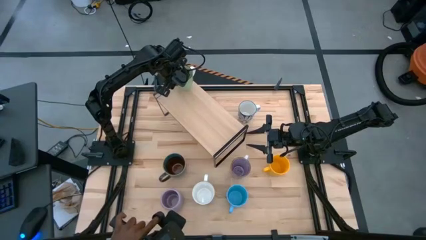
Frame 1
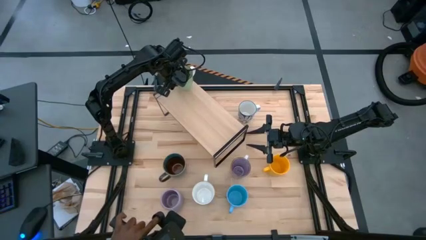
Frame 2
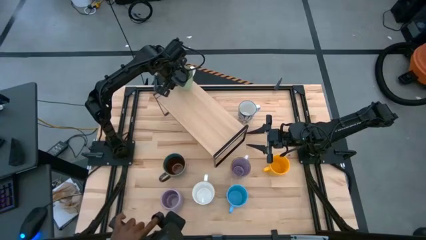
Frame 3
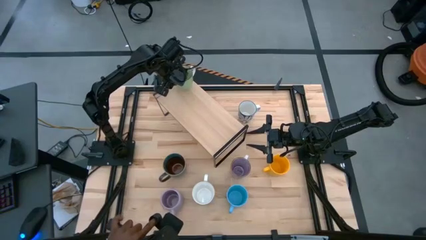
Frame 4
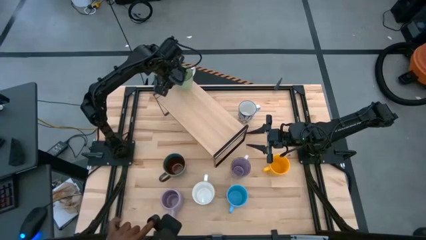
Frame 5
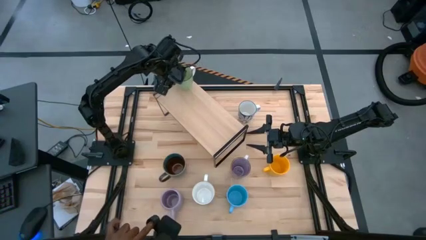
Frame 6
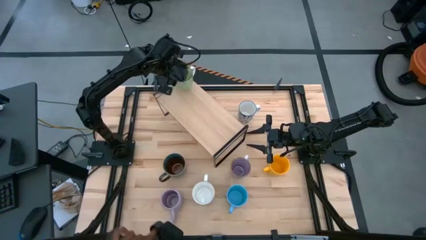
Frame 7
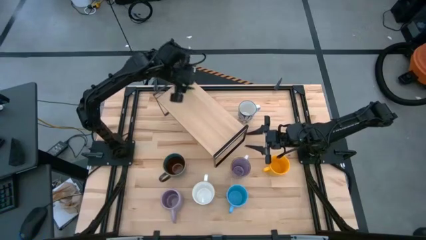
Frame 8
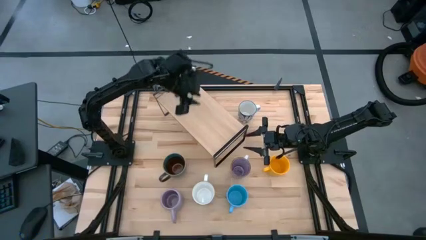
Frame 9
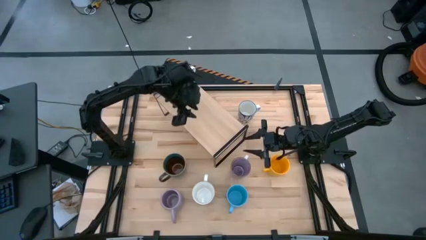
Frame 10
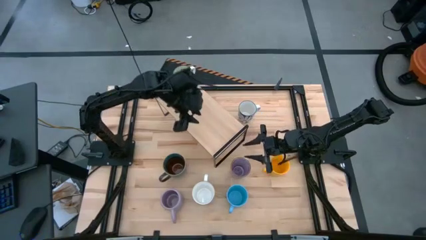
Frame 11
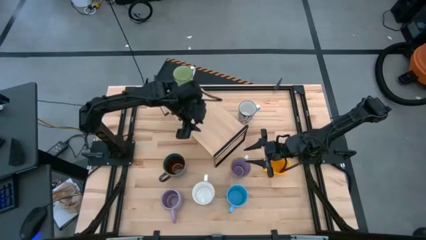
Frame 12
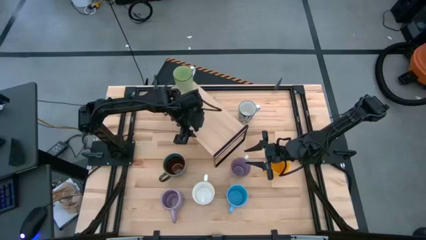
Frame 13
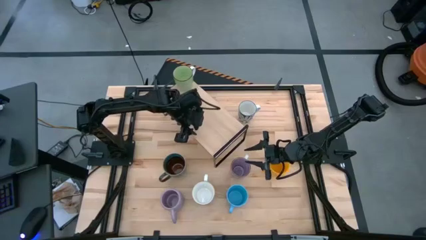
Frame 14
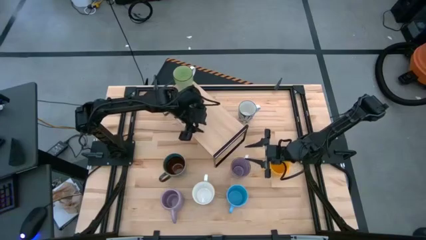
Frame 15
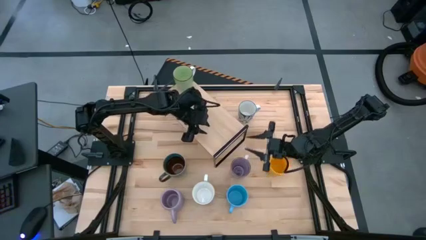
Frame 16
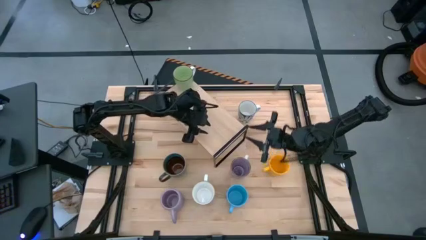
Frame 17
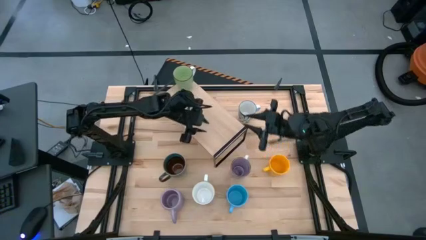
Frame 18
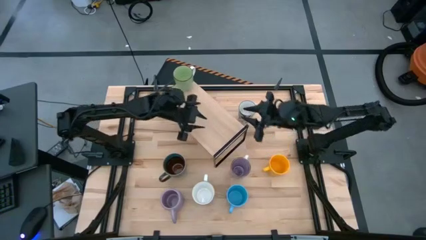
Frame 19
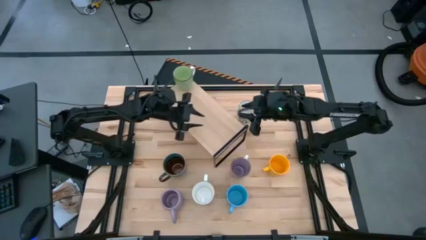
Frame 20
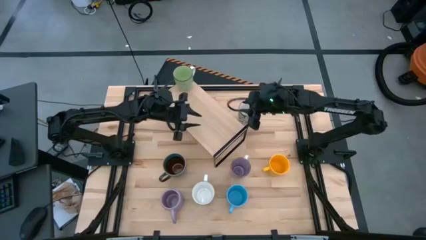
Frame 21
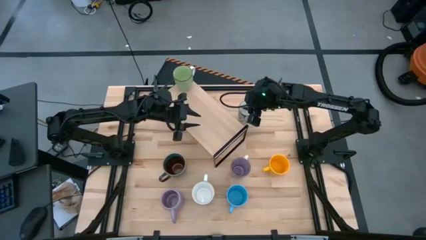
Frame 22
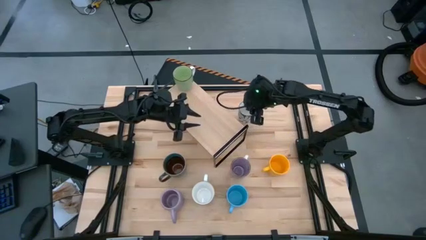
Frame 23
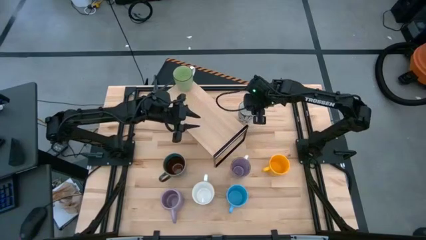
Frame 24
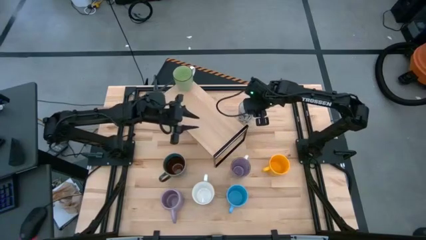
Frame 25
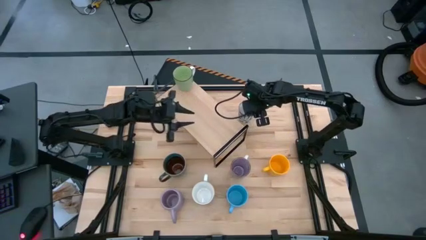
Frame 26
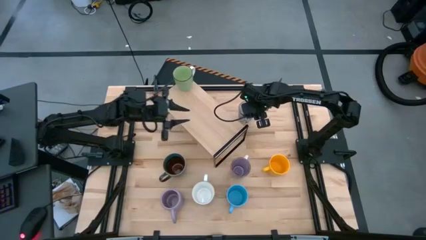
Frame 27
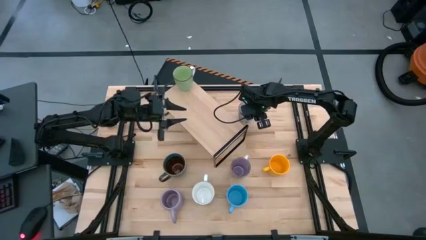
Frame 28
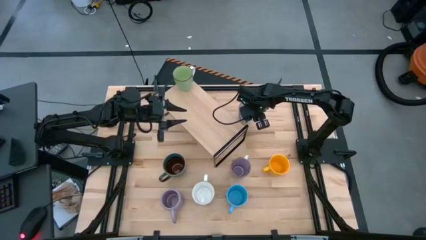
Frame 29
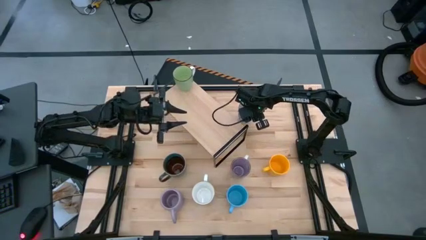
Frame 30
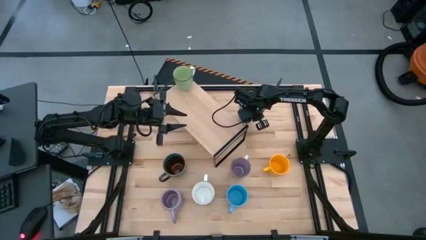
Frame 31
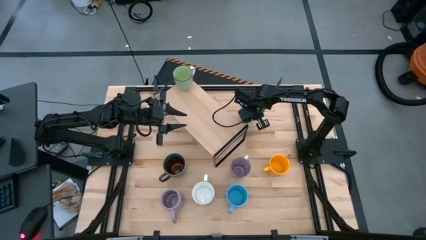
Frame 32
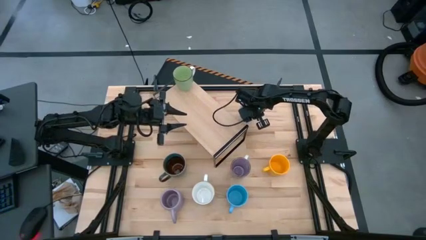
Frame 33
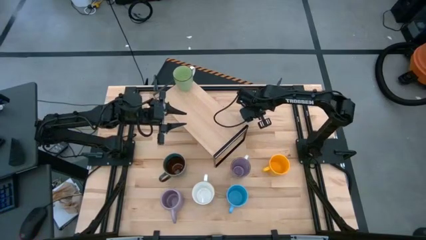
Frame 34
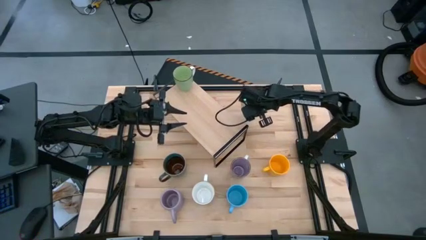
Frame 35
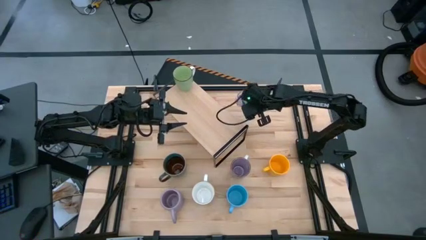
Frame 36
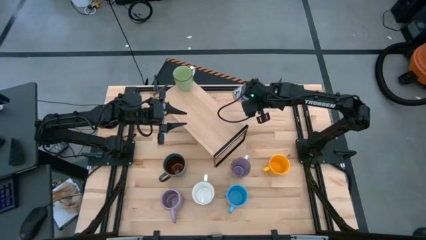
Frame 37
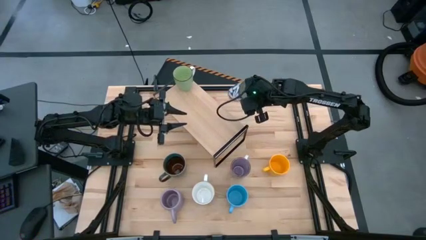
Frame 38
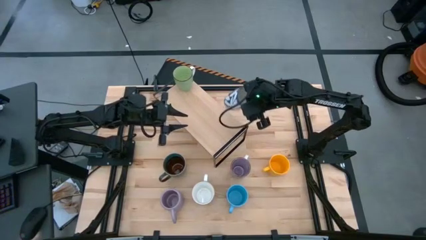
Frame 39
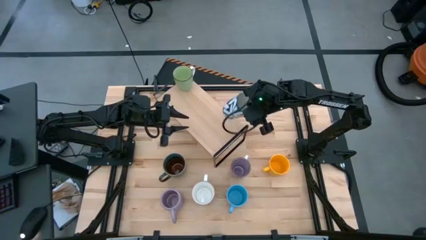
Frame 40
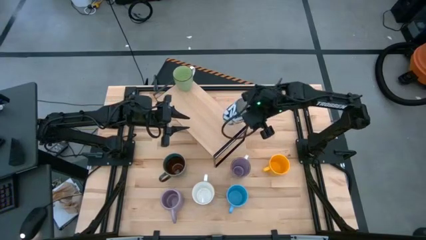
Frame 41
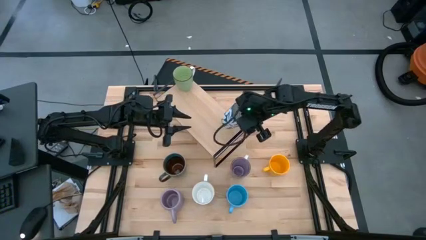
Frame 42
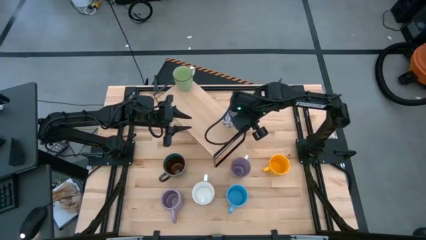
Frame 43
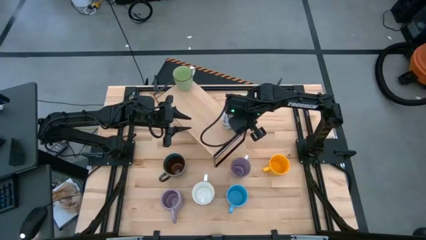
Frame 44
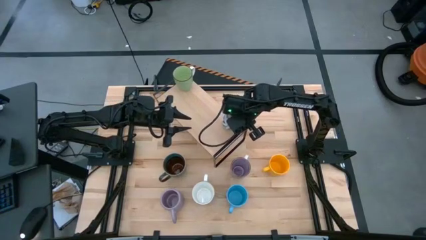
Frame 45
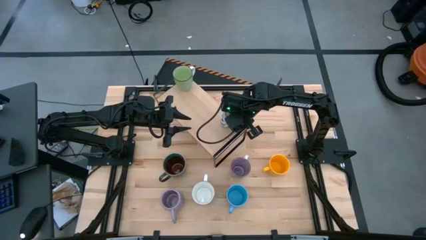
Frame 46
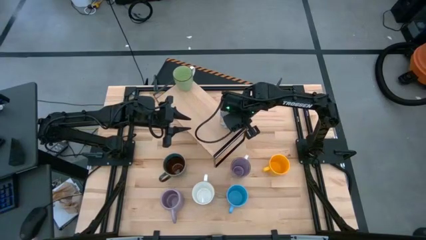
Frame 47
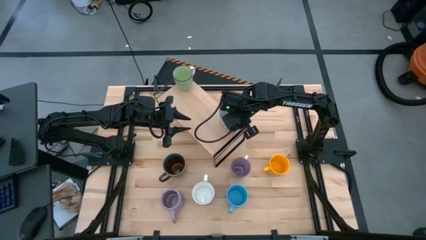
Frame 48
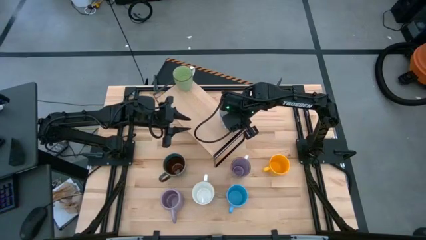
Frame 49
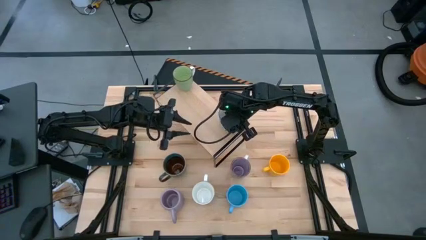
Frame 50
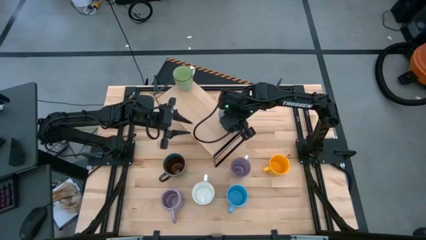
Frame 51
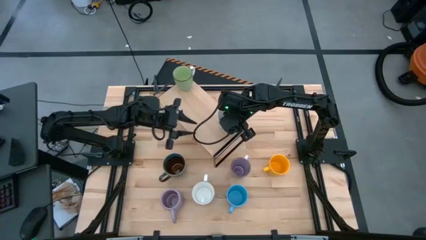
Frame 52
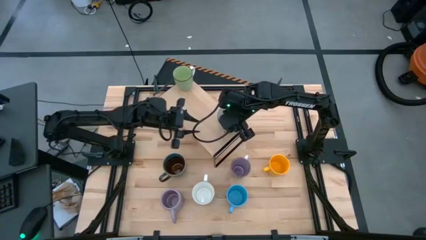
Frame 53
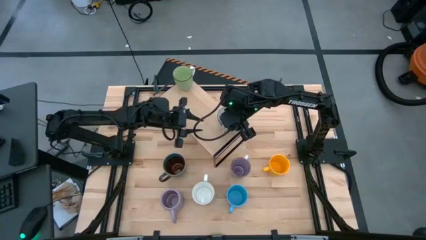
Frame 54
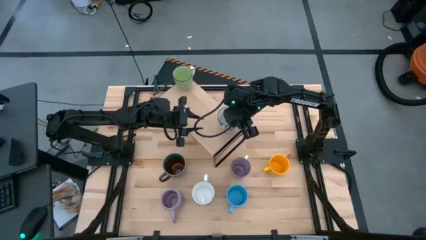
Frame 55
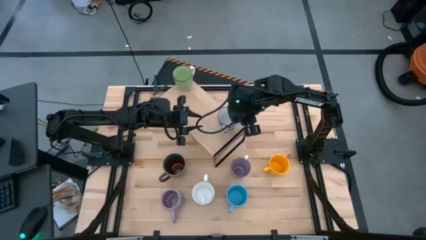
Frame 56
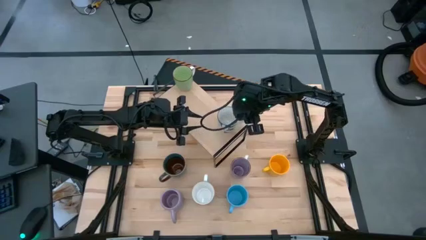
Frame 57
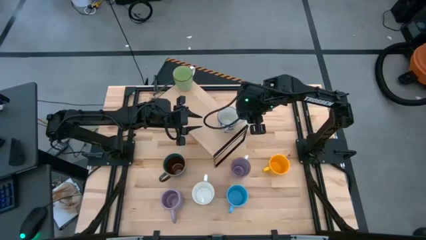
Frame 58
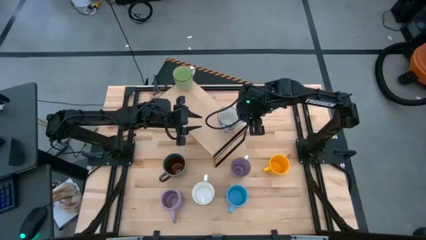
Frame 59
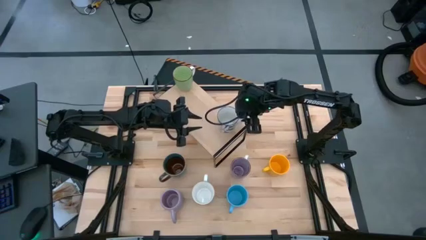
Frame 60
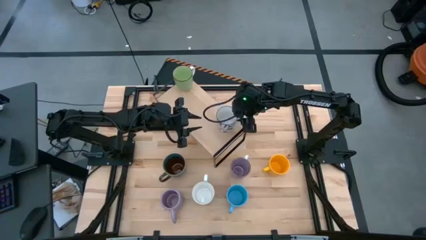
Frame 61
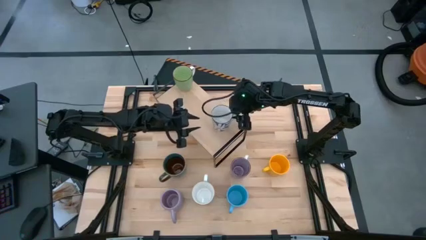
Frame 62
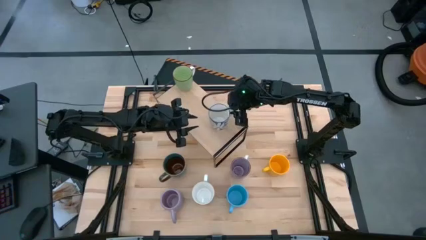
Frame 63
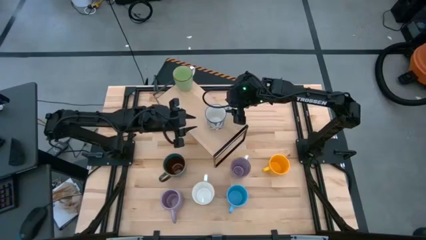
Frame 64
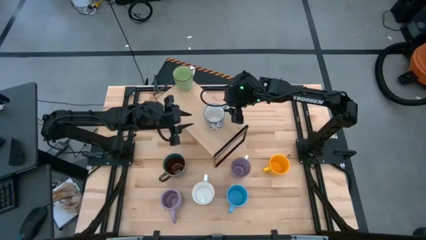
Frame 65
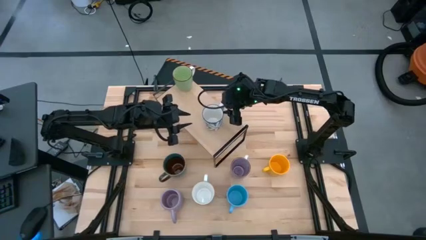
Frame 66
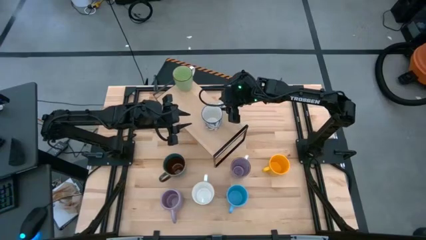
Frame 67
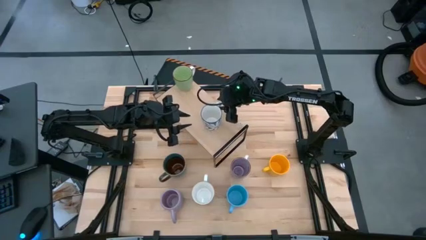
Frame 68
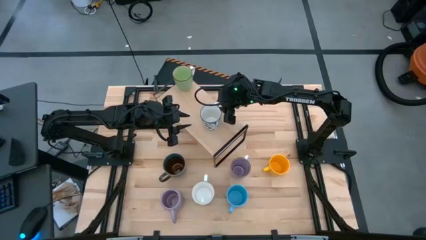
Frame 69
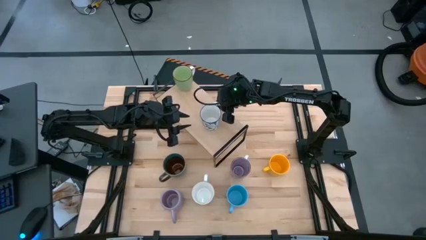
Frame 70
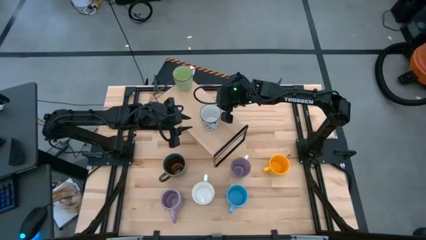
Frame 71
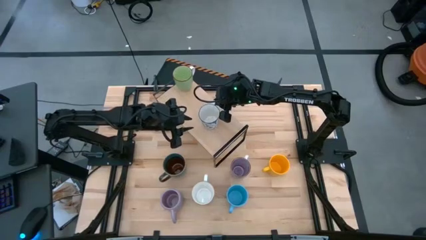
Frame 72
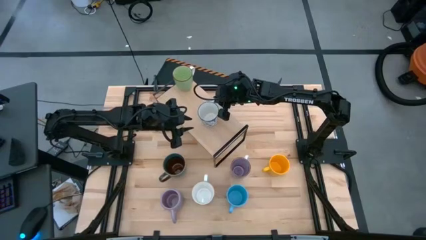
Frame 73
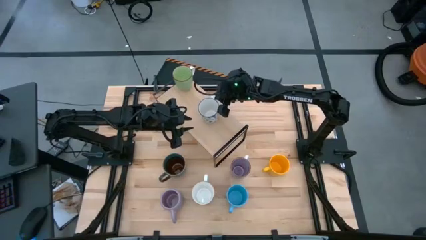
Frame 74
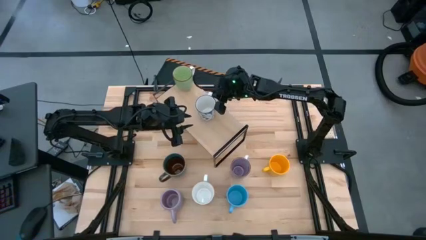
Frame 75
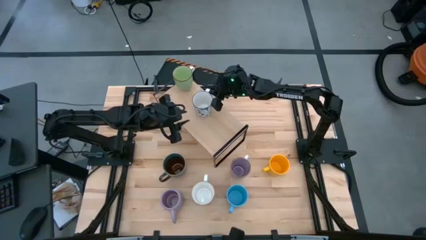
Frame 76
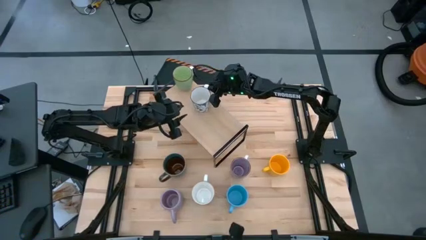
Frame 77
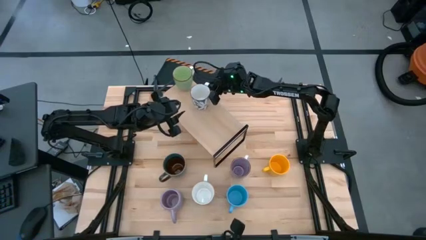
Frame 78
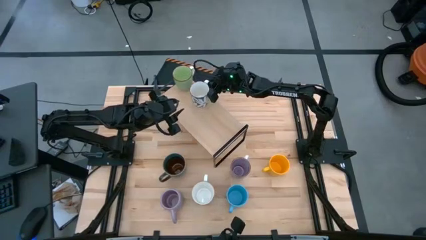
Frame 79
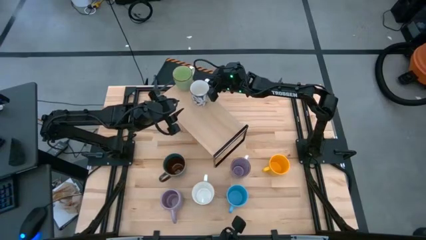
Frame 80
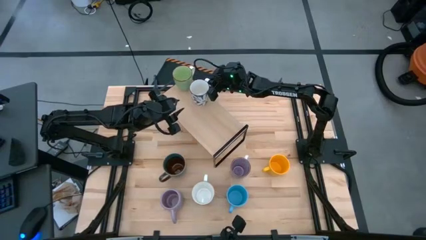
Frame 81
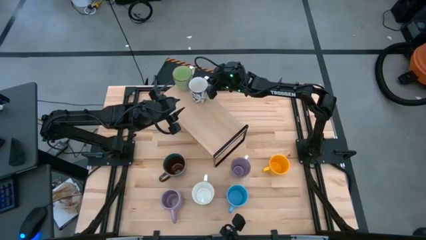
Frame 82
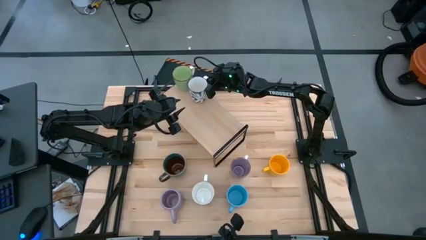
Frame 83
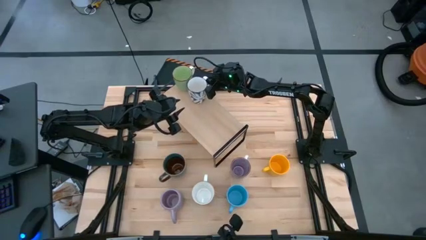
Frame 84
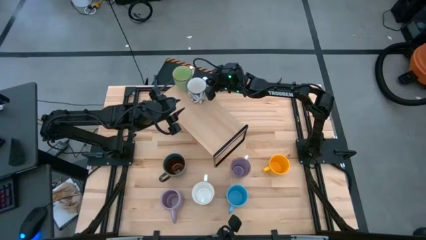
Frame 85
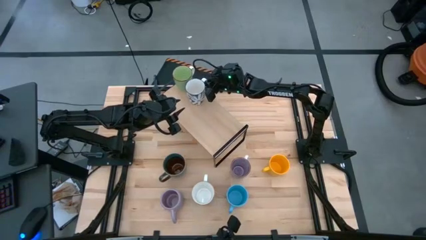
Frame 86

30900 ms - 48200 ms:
Task: Place coffee mugs
Put the blue patterned mug on the shelf

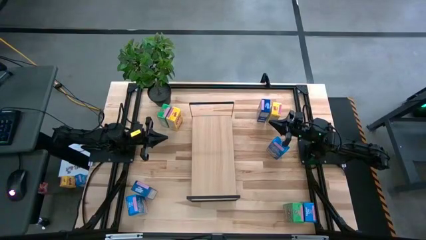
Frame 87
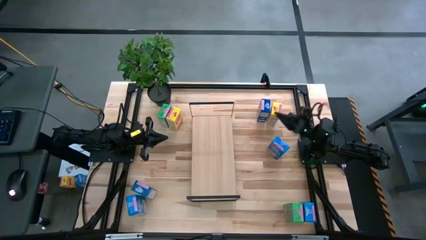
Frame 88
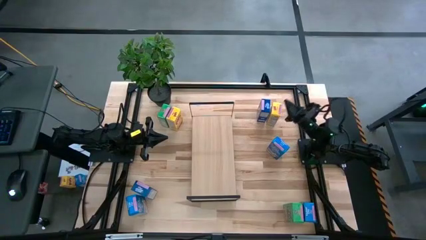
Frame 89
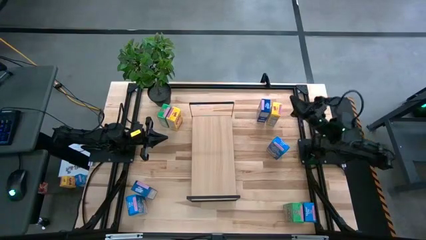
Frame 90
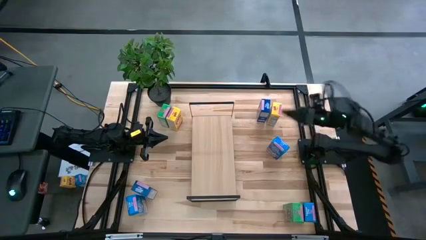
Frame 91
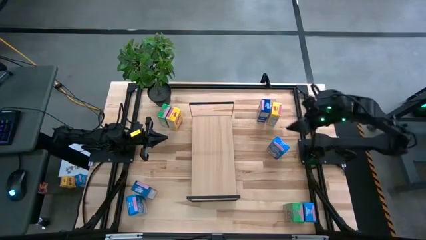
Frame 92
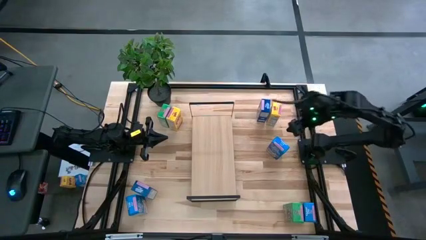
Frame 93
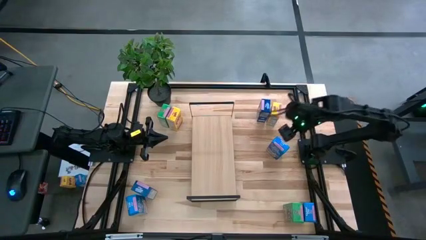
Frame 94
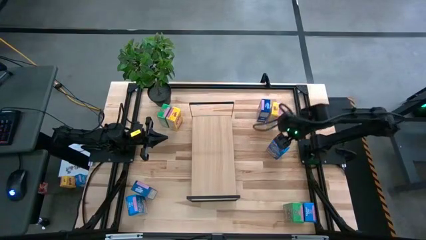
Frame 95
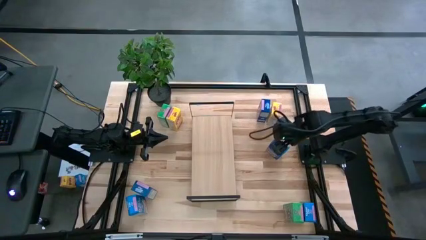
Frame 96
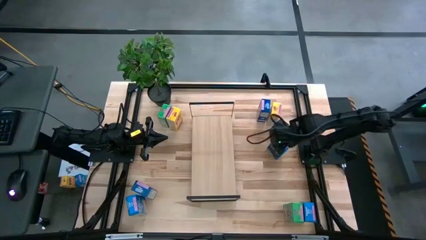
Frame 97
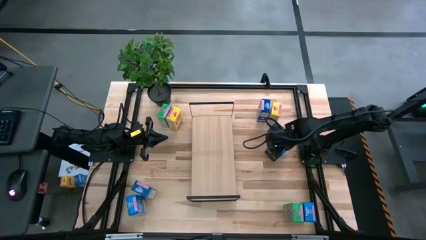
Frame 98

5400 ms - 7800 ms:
Task: Stack cereal on shelf
Put the top right light blue cereal box on the shelf
